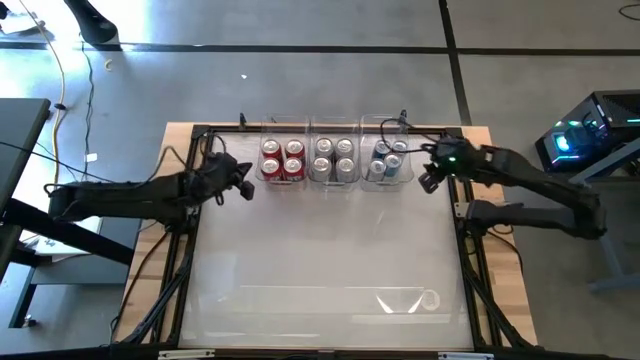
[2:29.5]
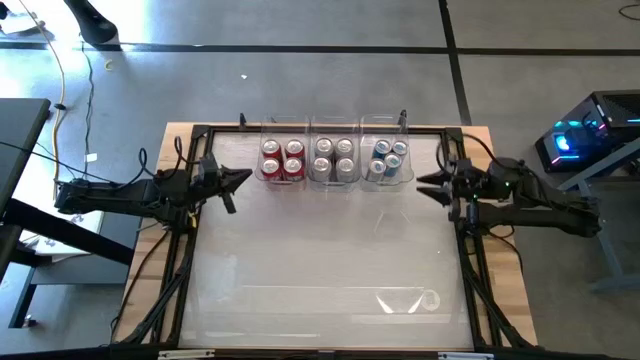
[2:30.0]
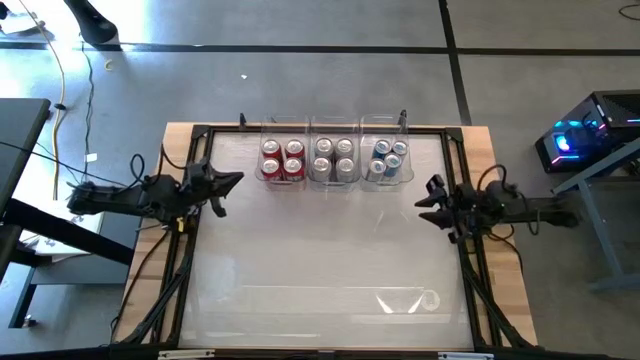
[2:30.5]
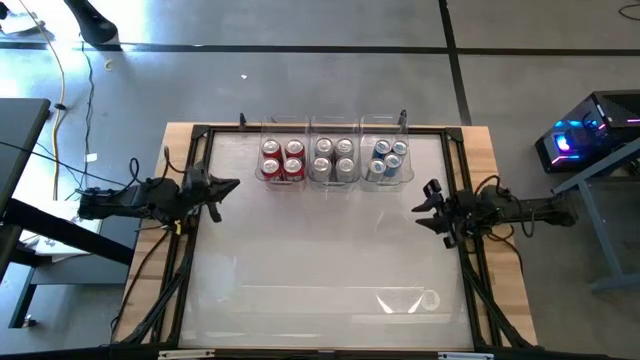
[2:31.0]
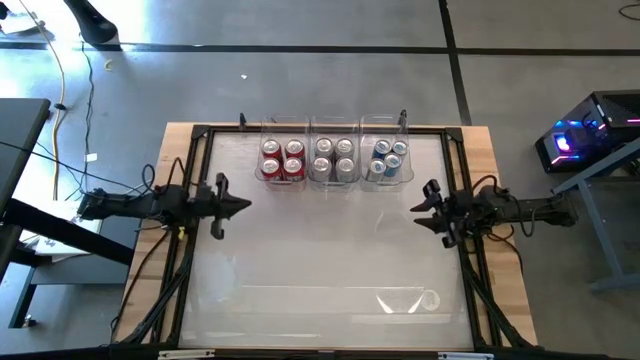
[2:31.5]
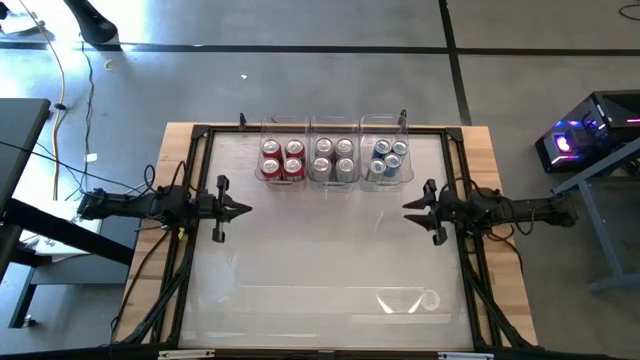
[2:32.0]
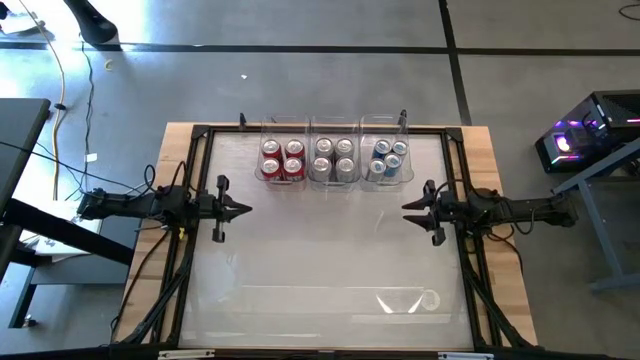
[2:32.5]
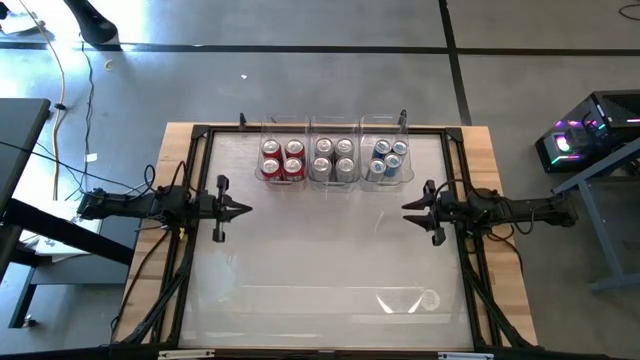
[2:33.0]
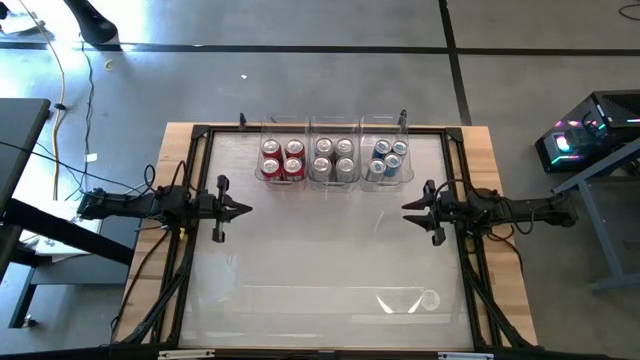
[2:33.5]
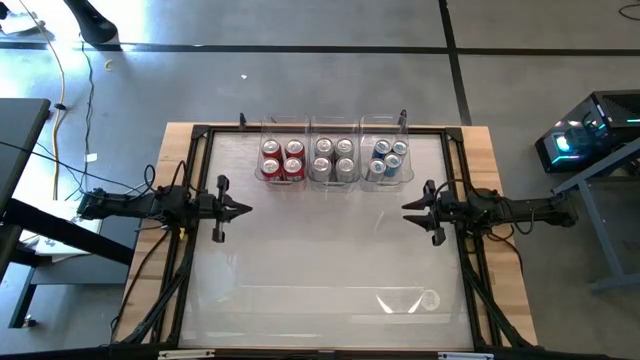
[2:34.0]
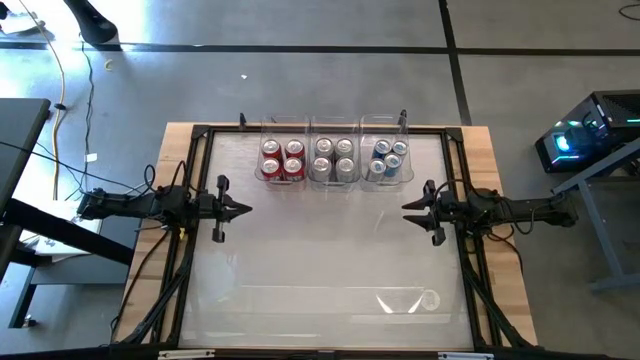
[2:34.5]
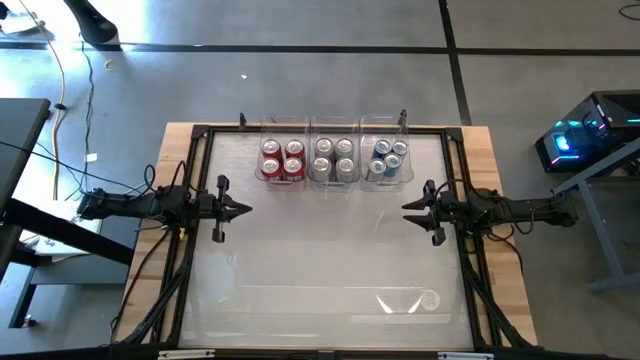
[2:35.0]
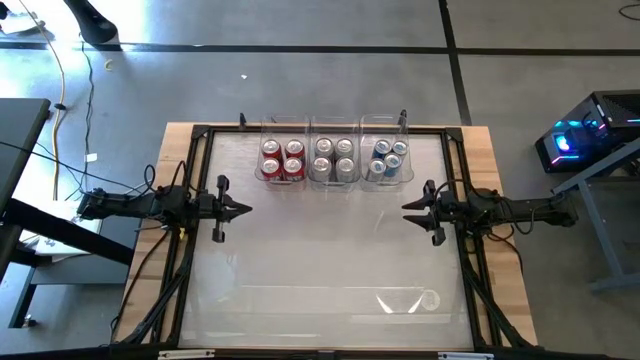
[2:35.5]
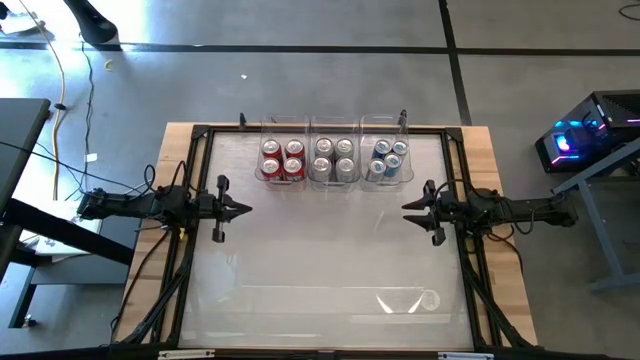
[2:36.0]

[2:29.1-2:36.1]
Task: Sort soda cans
Return to Home Position

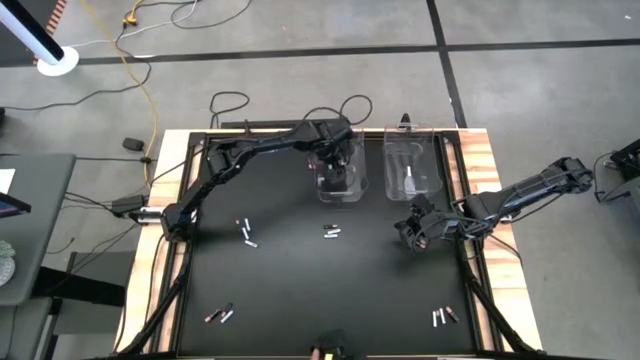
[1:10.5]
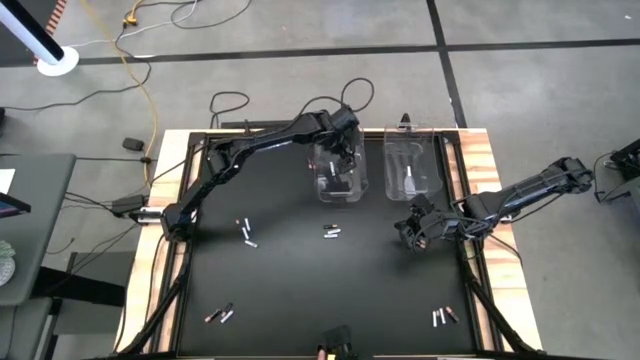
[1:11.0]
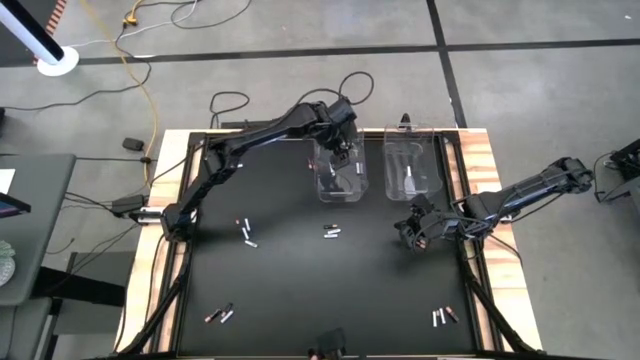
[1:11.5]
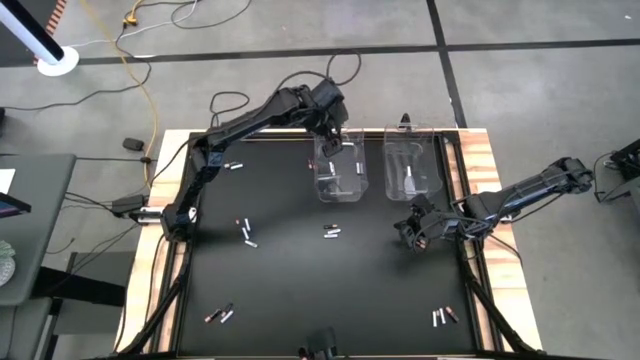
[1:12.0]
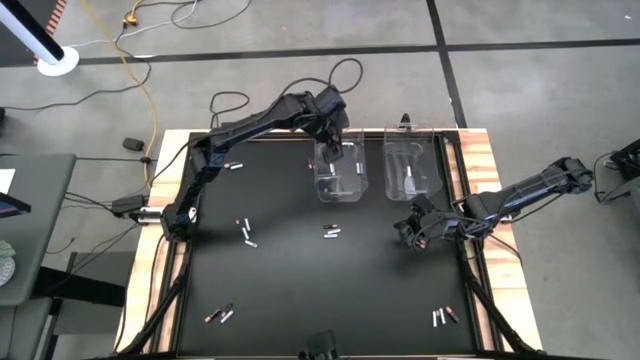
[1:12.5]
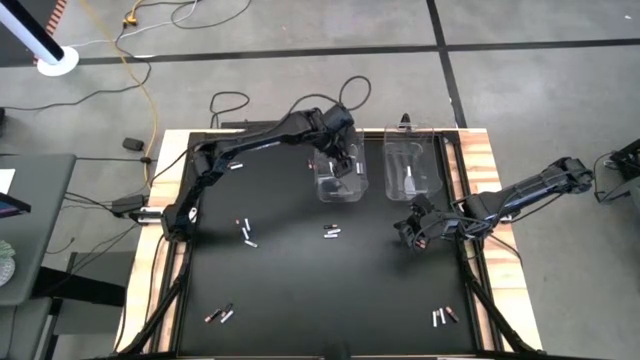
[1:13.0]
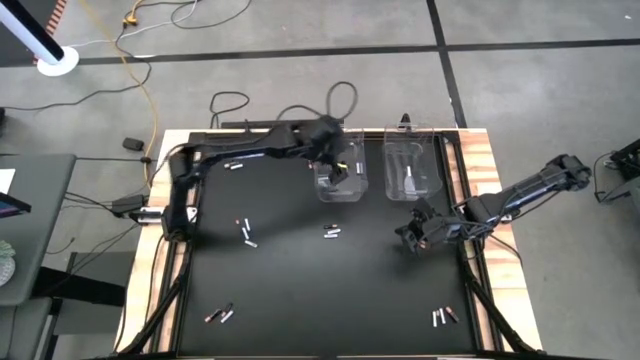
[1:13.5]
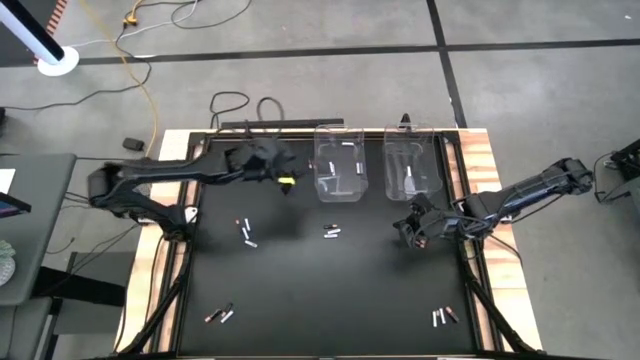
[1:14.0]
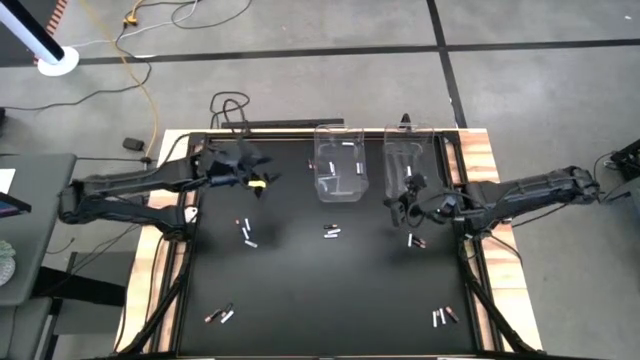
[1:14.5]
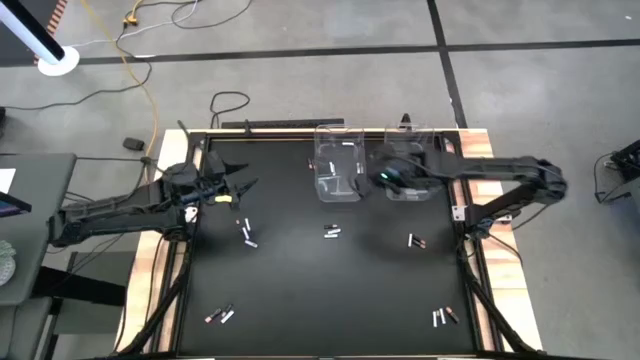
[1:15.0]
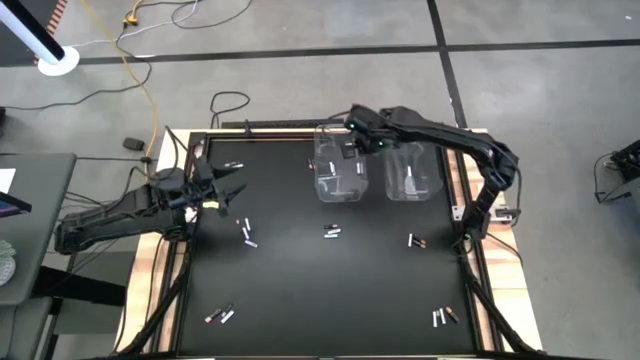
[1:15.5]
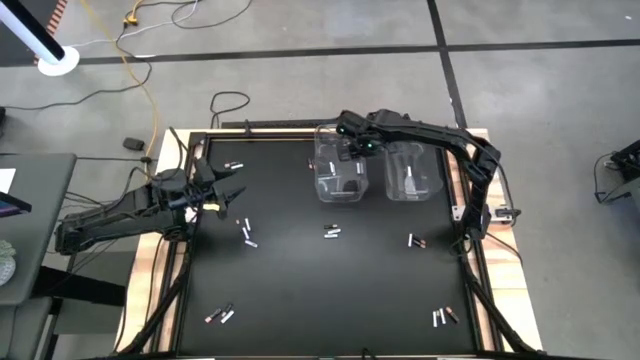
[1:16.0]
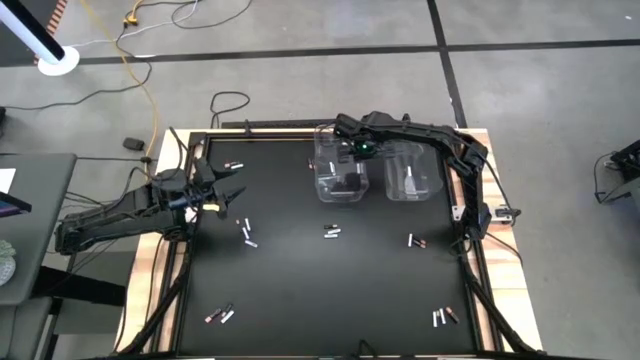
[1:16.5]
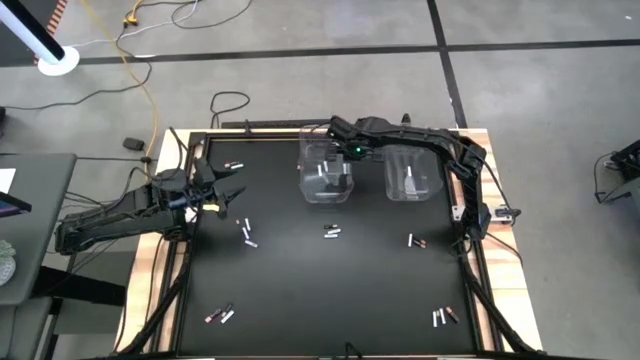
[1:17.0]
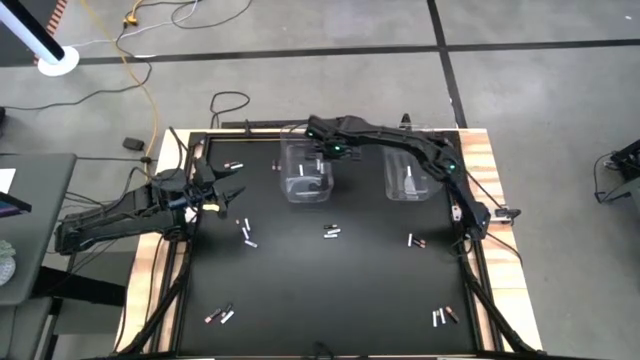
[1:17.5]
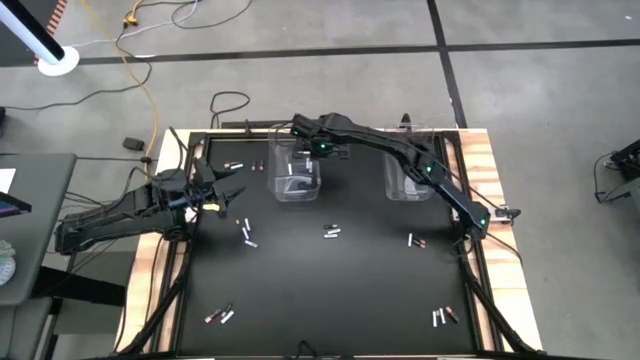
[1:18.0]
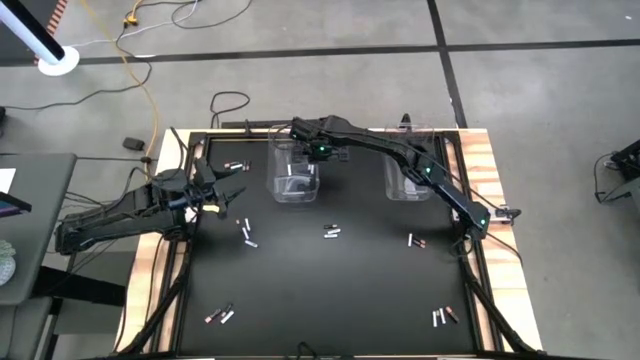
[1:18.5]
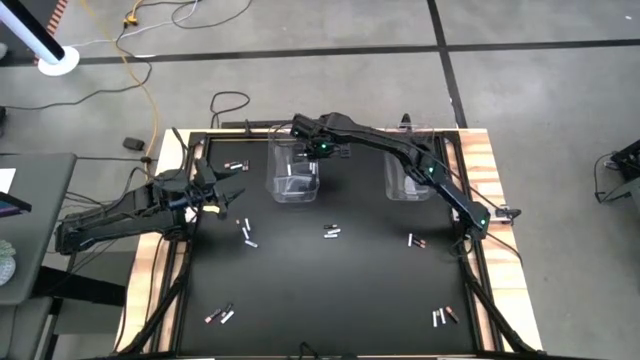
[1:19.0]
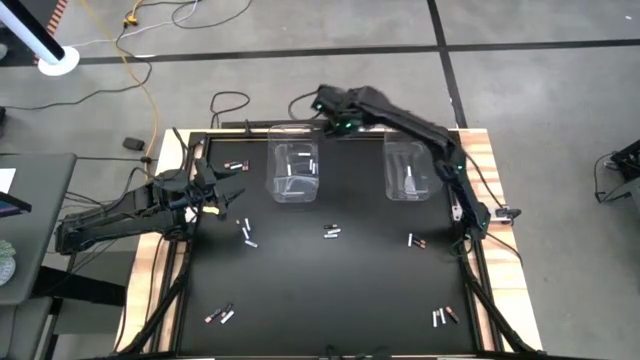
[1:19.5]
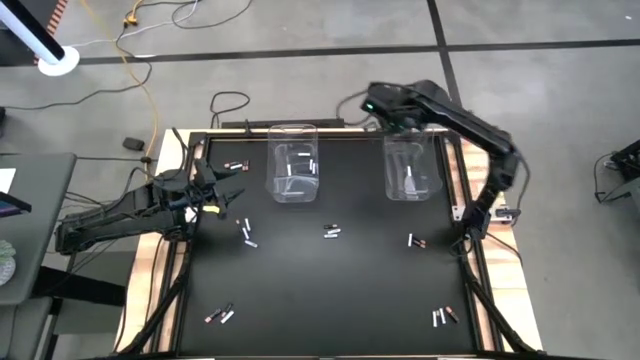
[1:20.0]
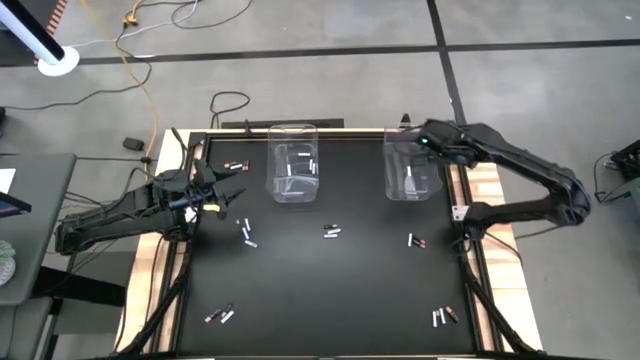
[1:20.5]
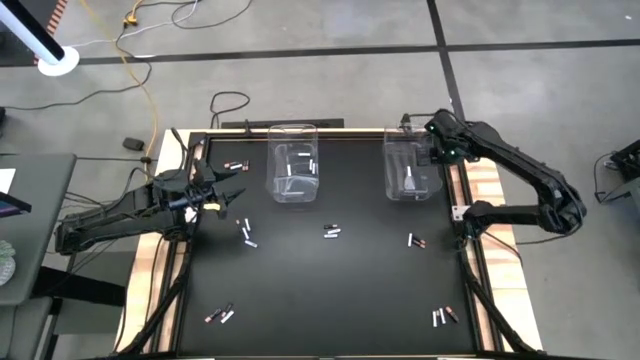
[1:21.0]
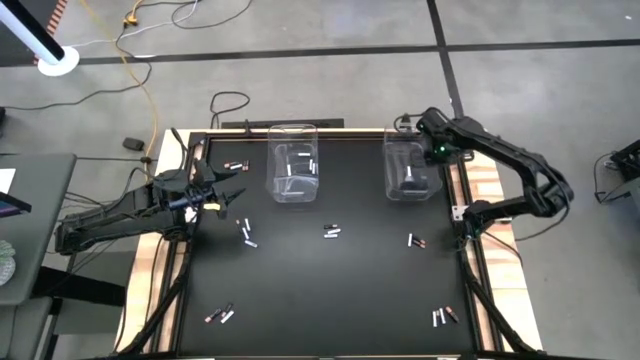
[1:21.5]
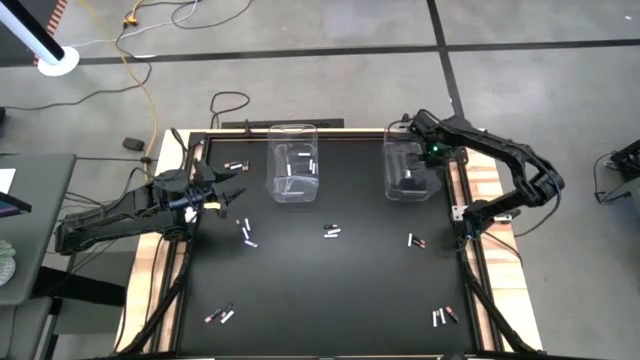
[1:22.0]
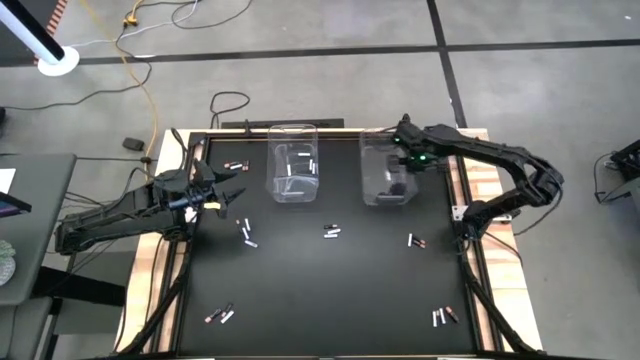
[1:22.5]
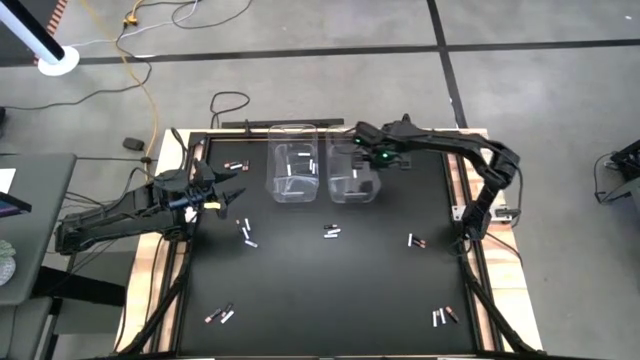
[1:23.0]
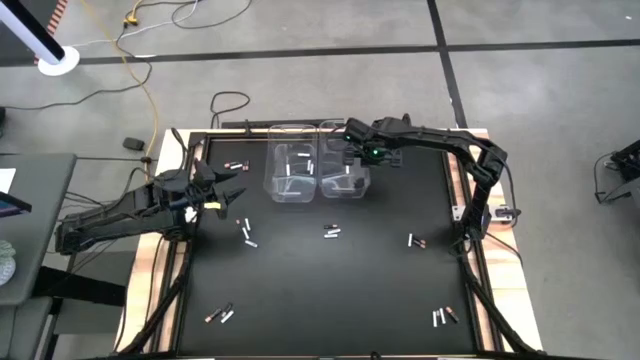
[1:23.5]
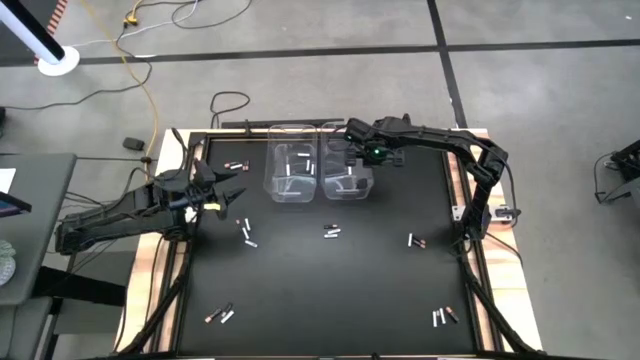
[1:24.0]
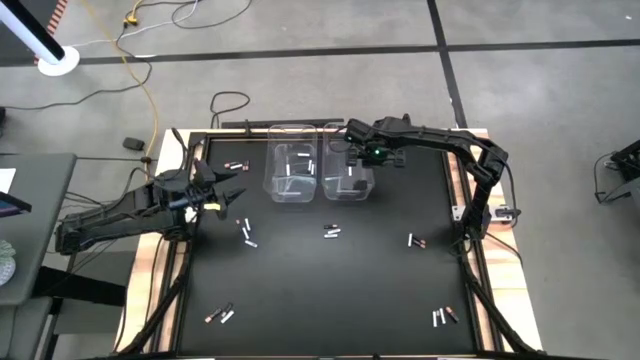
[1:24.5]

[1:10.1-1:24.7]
Task: Sort batteries
Adjust all the transparent bin
